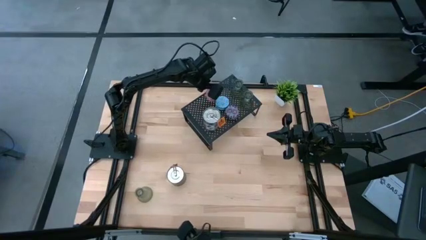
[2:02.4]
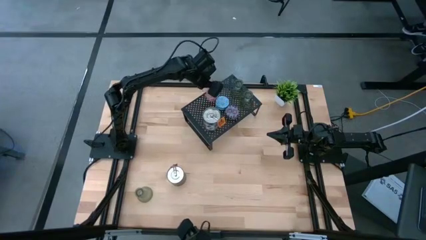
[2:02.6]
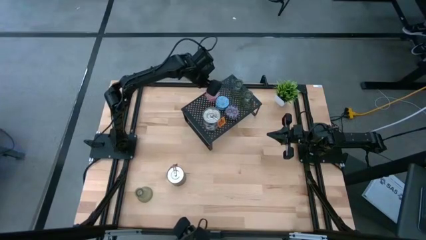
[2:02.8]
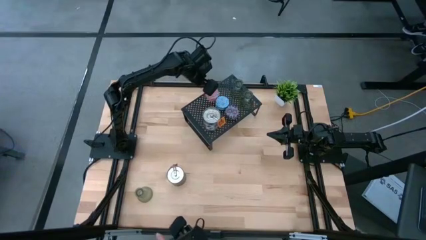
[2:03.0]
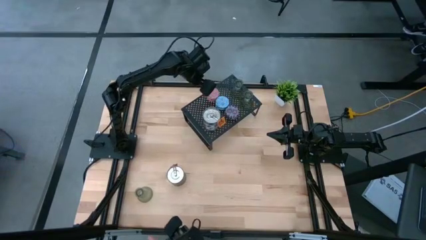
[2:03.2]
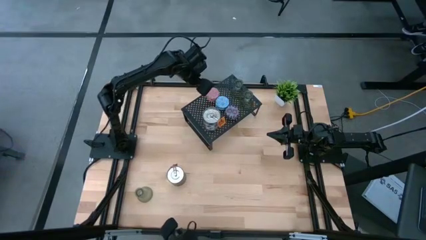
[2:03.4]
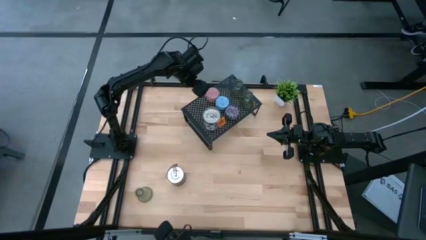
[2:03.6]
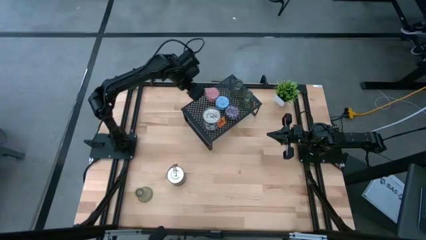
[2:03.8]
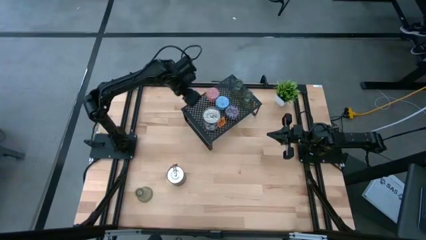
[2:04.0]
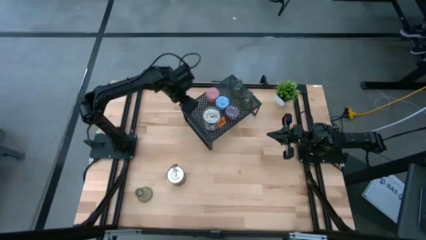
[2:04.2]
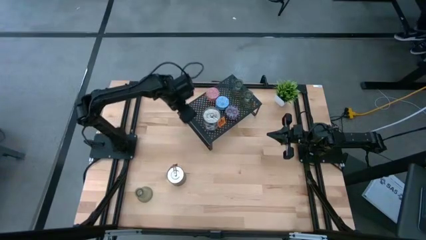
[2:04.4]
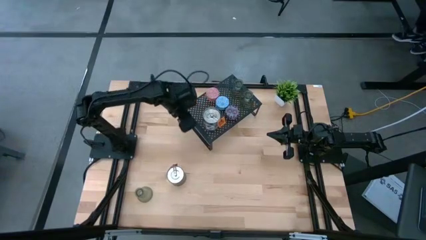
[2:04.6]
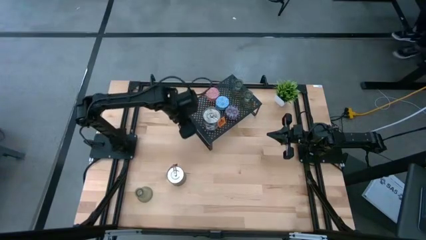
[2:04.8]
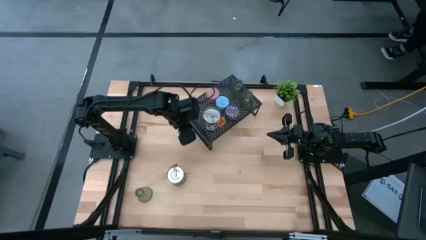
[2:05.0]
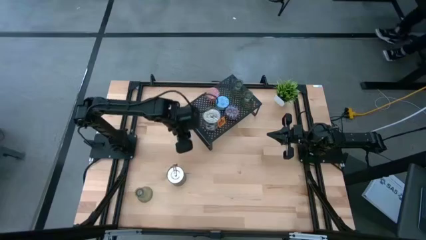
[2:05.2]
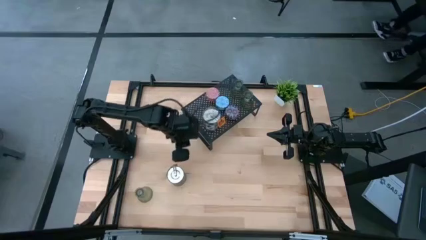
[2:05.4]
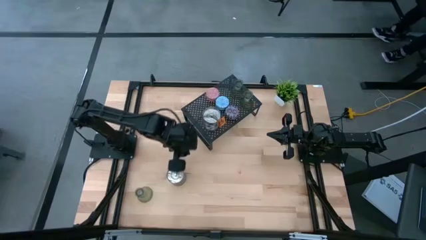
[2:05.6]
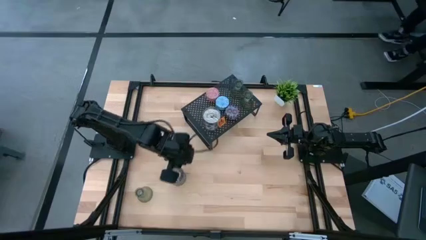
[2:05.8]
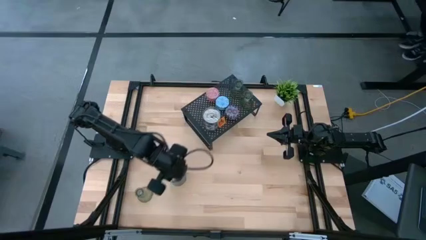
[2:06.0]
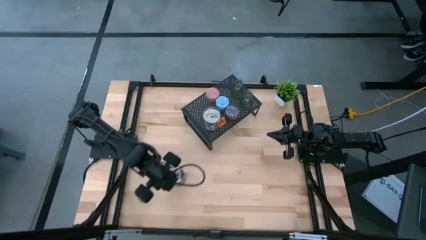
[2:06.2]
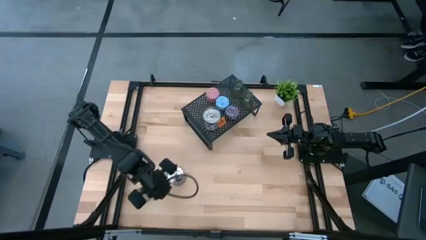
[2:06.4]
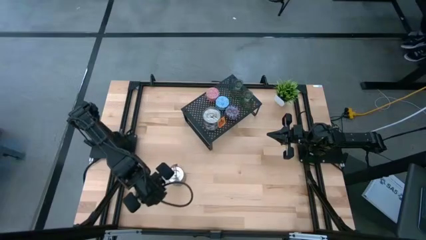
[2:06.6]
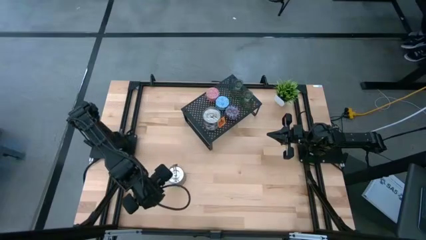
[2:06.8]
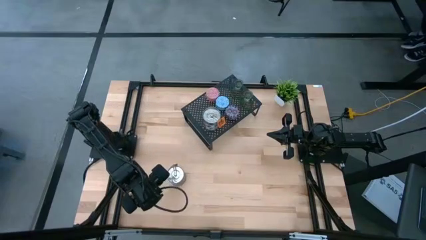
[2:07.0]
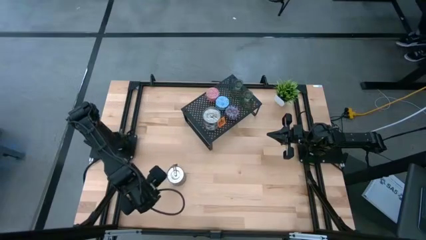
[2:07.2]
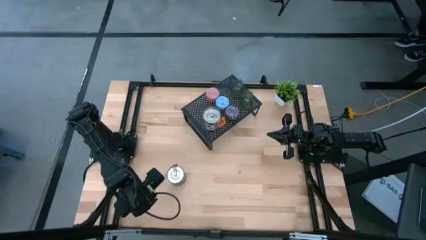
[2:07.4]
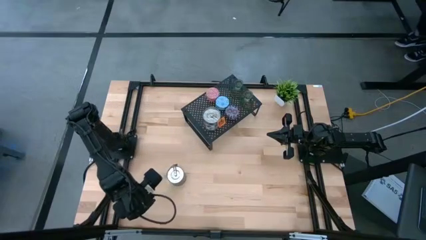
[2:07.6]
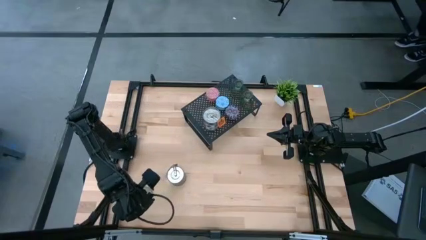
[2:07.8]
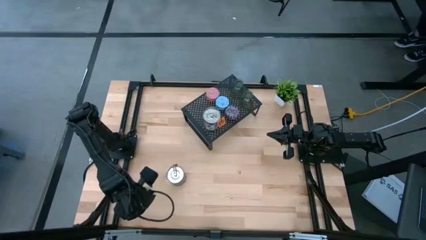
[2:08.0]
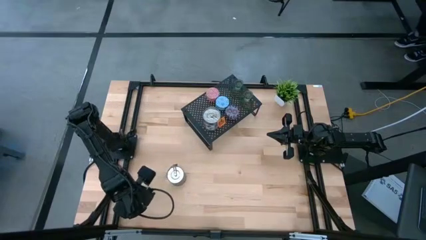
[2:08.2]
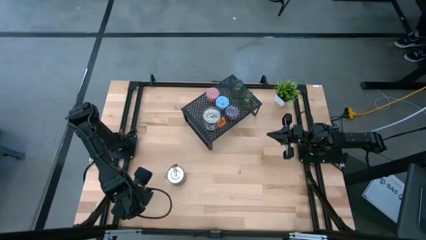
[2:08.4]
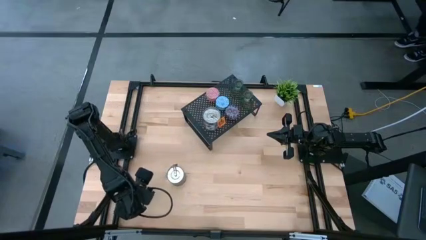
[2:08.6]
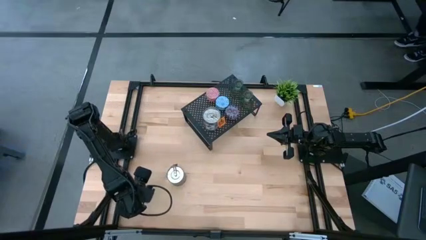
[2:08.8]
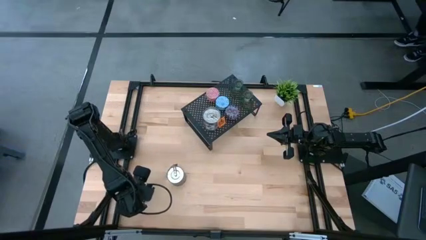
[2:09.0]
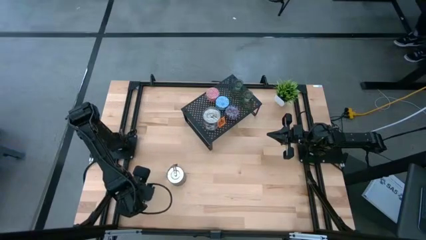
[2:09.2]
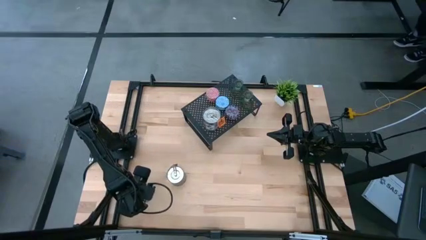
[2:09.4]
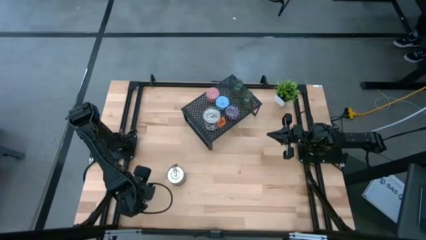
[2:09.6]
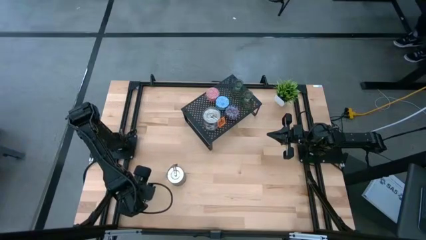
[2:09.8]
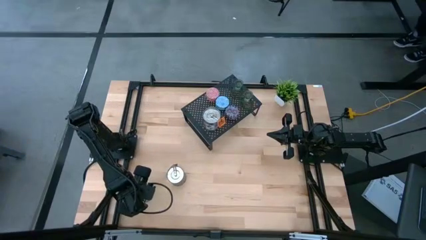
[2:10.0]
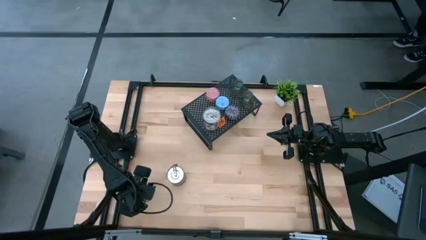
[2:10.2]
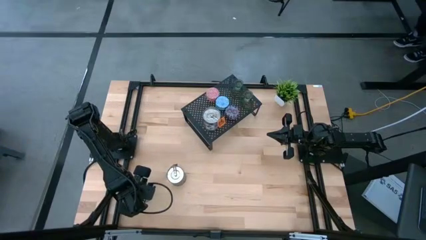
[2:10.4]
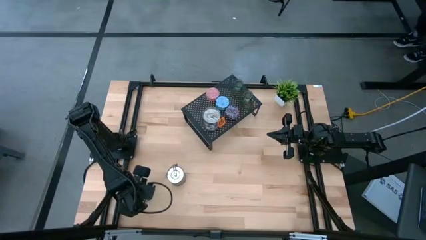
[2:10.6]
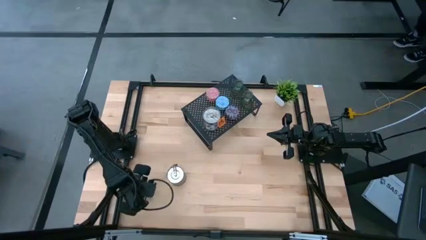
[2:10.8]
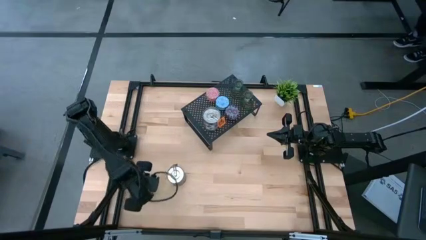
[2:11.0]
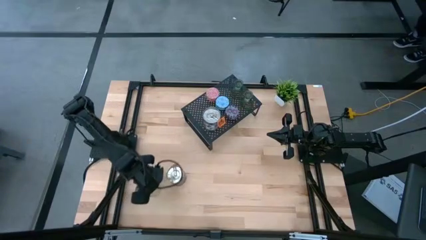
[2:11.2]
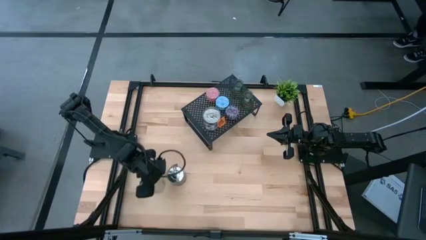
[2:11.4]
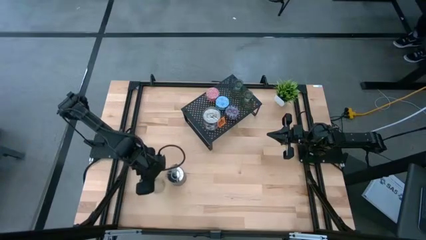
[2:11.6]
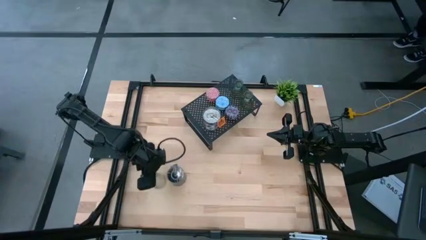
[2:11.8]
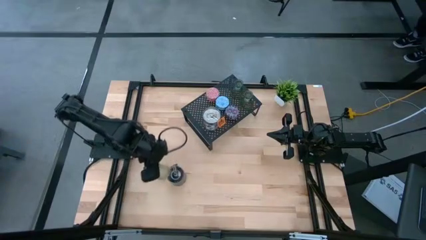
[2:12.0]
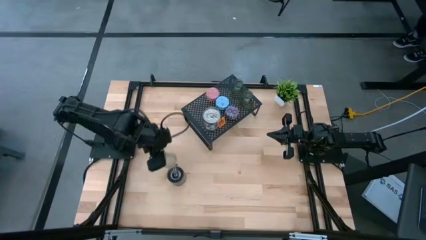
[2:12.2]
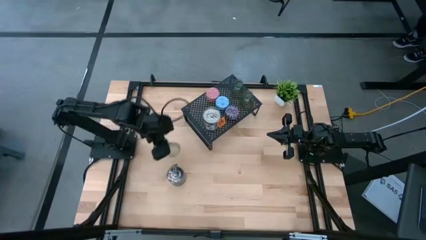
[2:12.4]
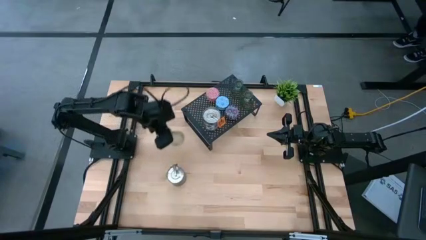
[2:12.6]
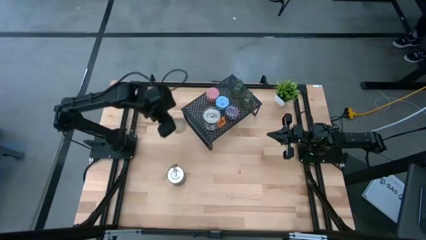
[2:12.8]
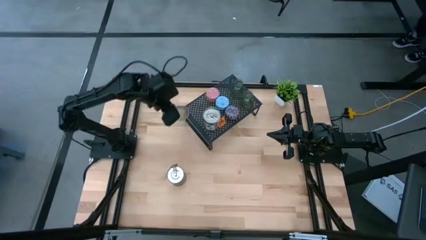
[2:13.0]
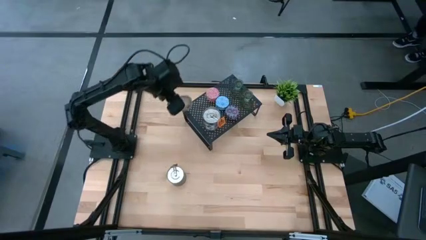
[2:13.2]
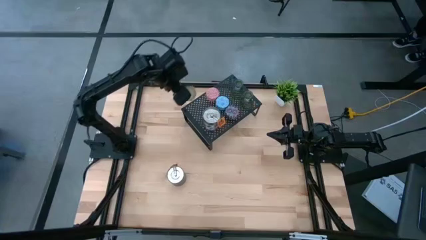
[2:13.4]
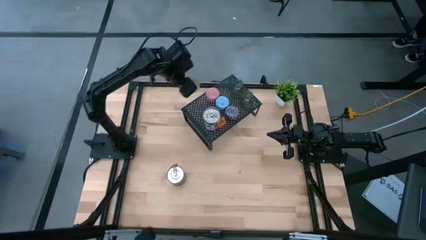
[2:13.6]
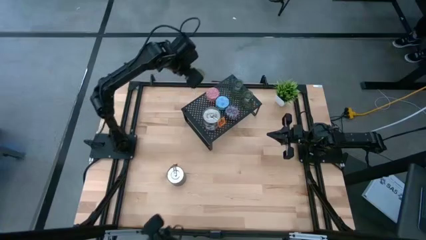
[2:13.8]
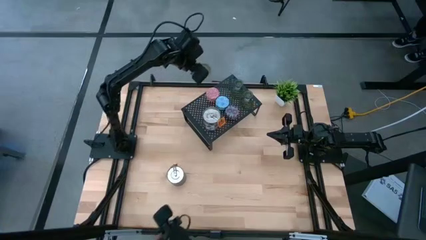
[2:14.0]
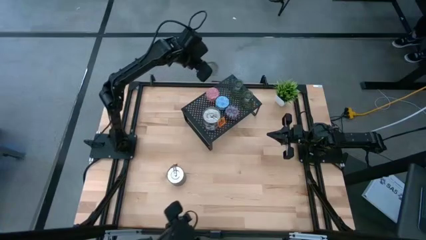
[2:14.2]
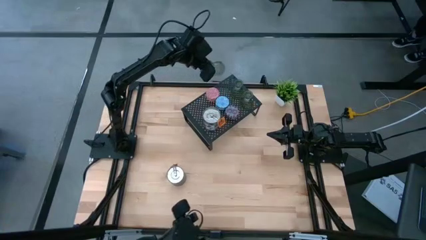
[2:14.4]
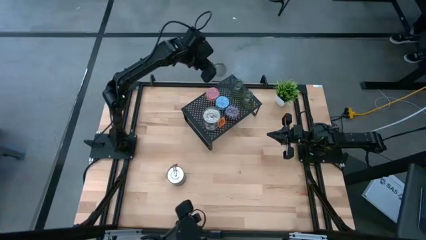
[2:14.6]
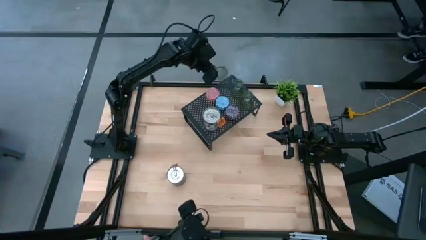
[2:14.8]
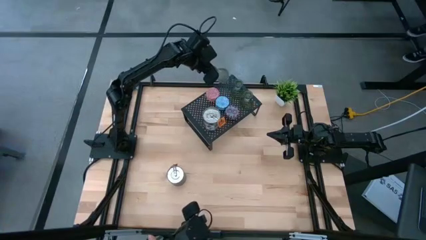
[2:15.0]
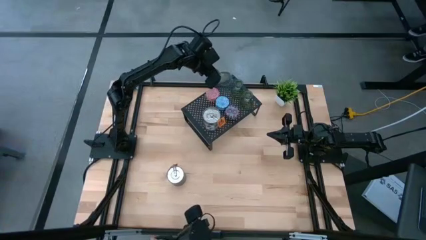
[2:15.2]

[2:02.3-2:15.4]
Task: Pick & Place candle stick holders
Put the green glass candle holder on the shelf aligned with the green glass candle holders
